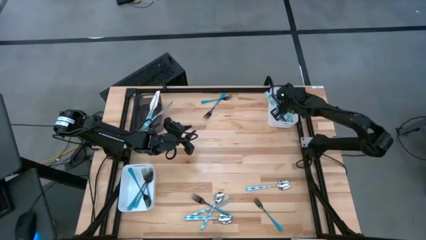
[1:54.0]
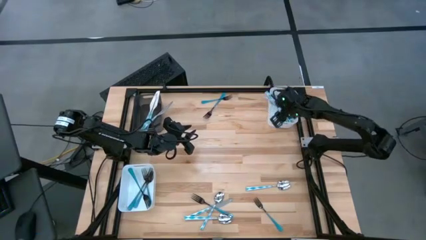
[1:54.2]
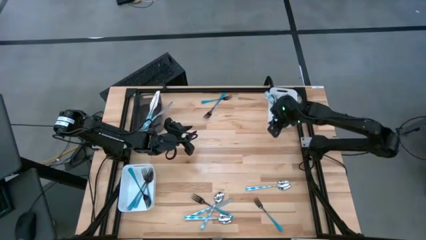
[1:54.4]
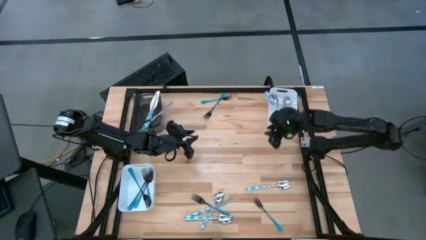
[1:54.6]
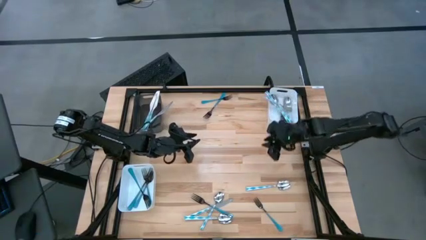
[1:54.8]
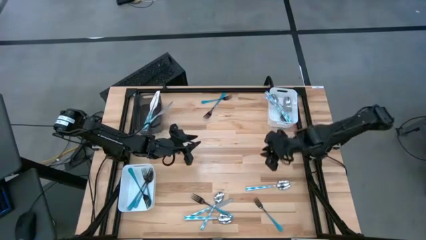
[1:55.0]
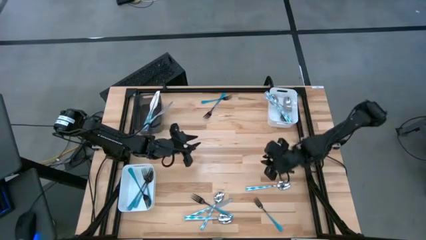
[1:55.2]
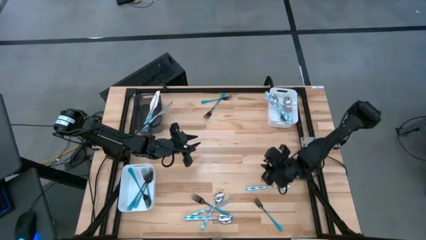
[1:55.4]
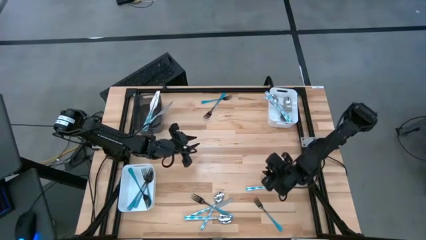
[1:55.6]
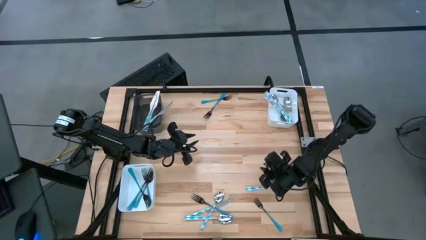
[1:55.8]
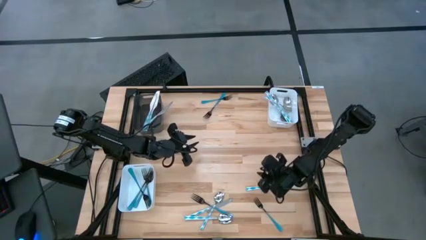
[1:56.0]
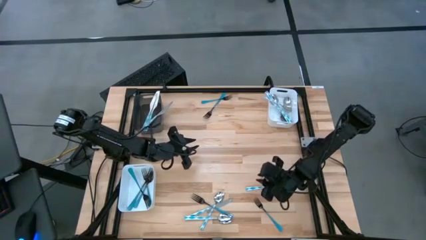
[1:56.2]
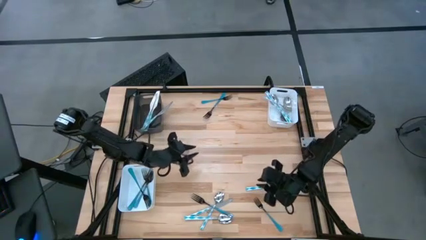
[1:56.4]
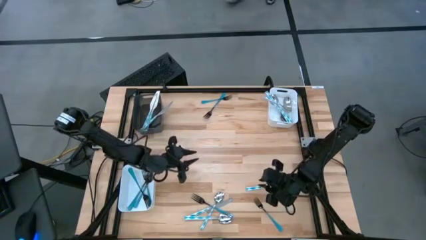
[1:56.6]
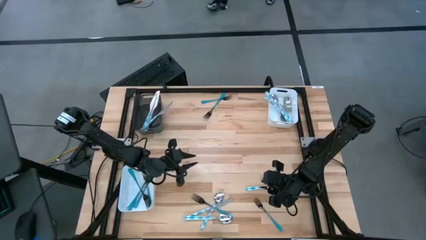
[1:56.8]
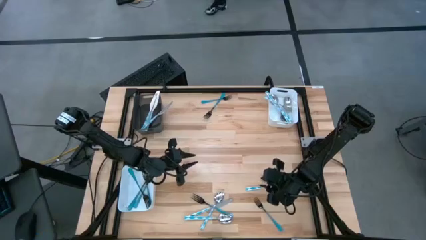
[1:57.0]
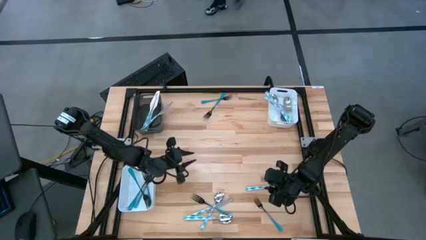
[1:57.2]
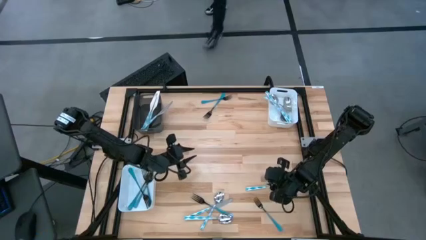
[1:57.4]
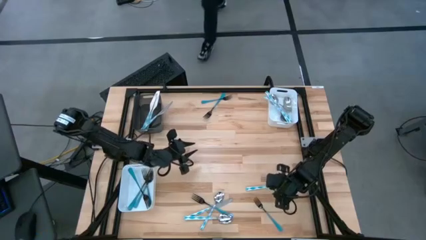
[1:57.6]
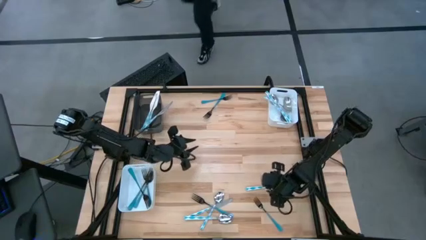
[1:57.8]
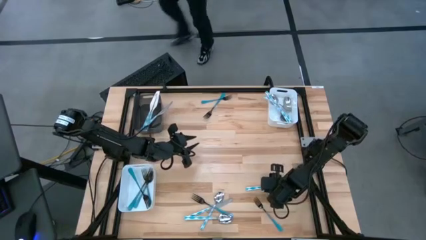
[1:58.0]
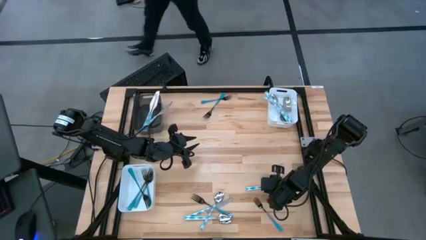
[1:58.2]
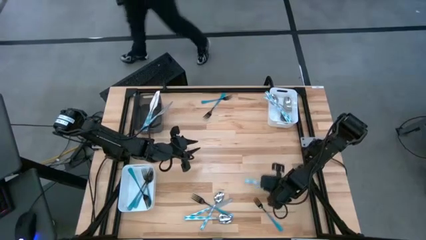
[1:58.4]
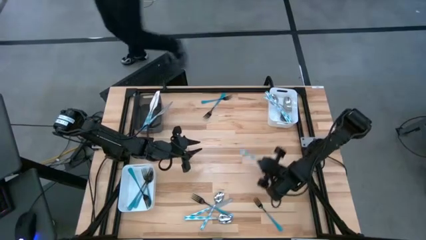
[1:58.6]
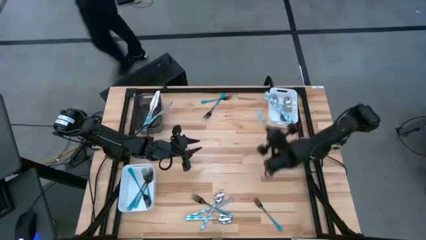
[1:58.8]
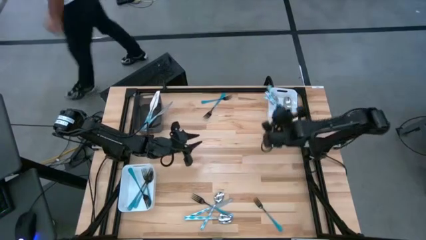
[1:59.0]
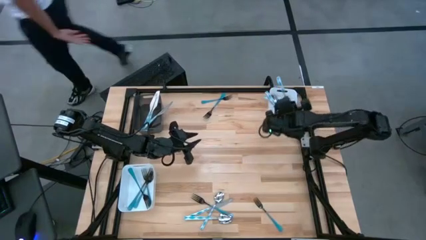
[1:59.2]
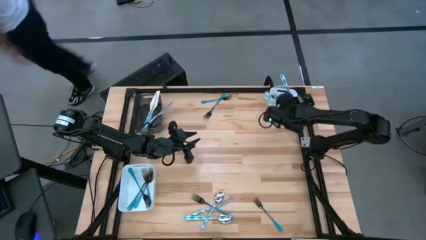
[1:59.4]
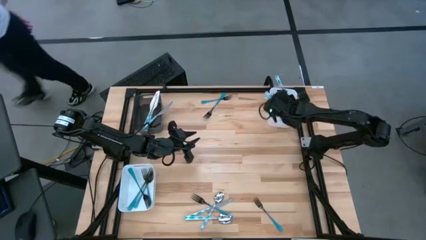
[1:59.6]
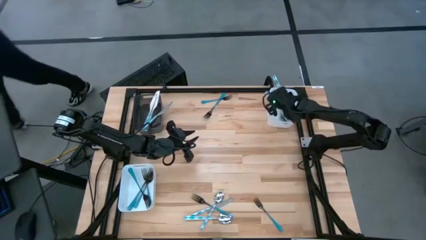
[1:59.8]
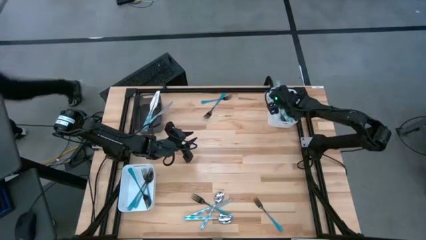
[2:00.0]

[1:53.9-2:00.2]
Task: Sort silverware by color (type)
Put the blue white spoon into the right white bin

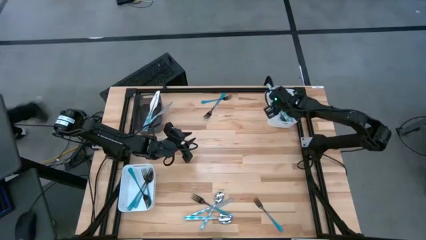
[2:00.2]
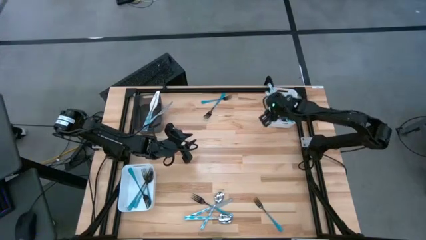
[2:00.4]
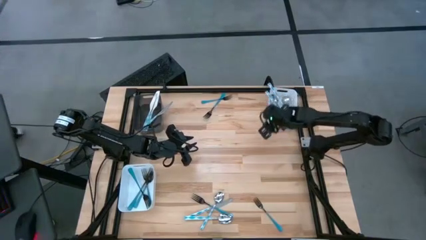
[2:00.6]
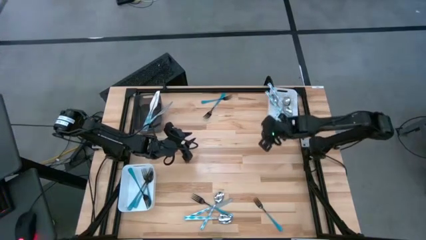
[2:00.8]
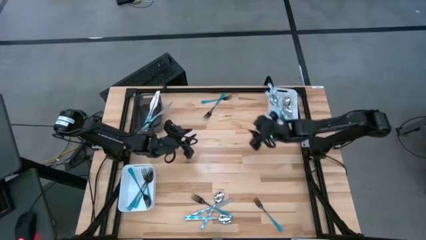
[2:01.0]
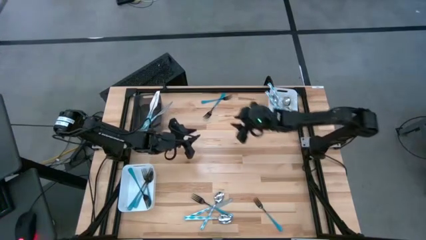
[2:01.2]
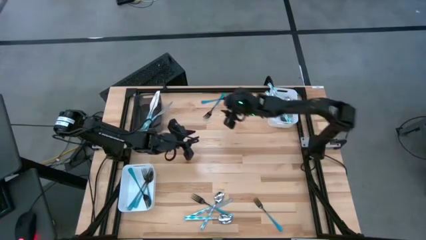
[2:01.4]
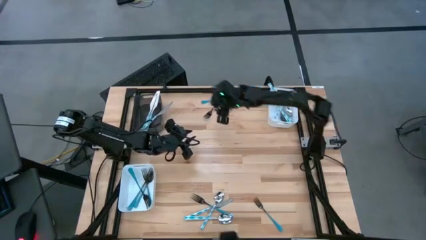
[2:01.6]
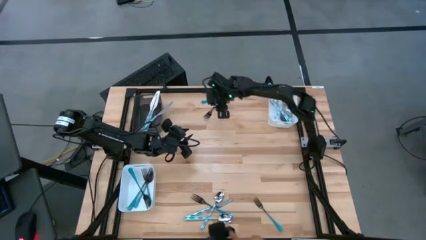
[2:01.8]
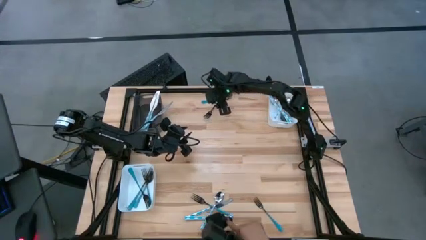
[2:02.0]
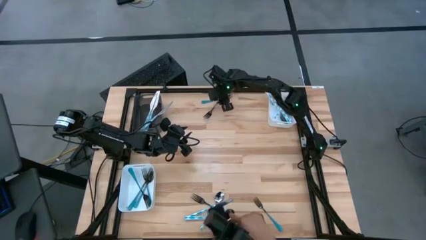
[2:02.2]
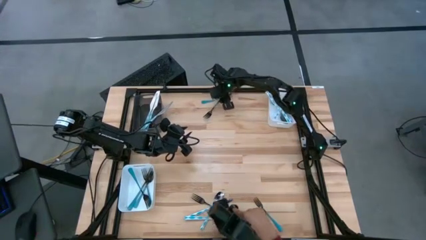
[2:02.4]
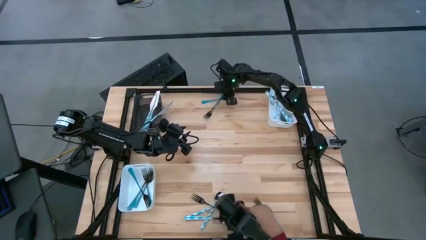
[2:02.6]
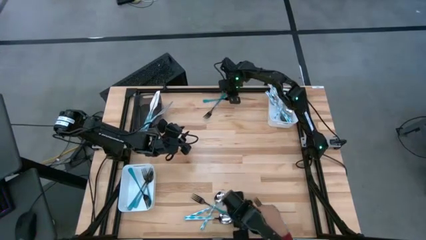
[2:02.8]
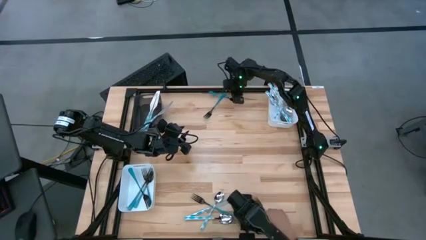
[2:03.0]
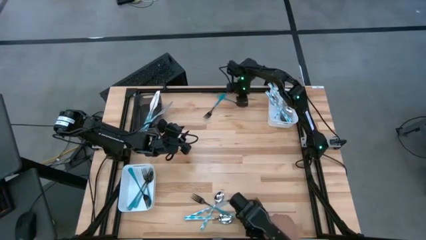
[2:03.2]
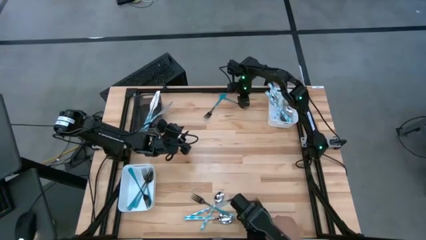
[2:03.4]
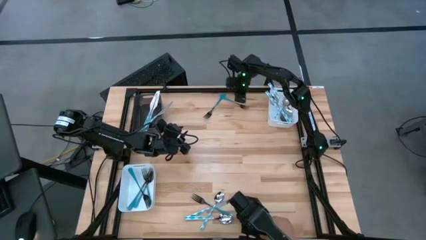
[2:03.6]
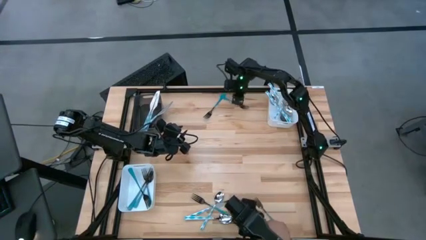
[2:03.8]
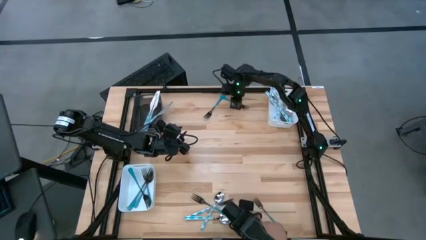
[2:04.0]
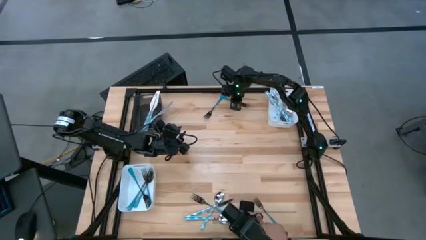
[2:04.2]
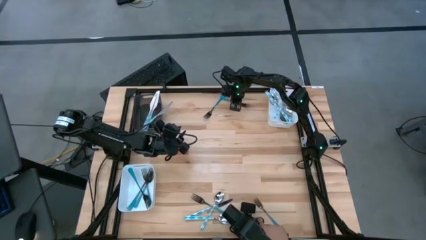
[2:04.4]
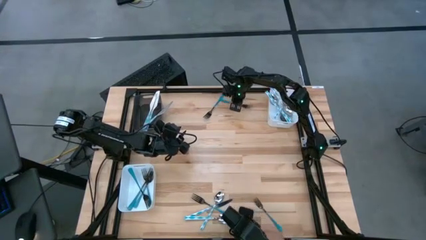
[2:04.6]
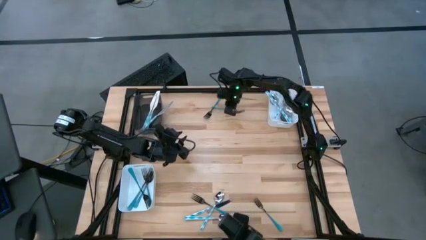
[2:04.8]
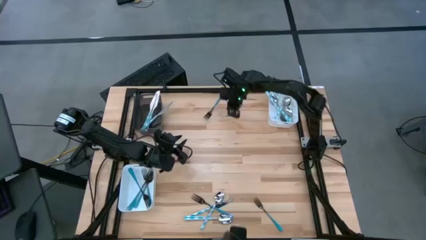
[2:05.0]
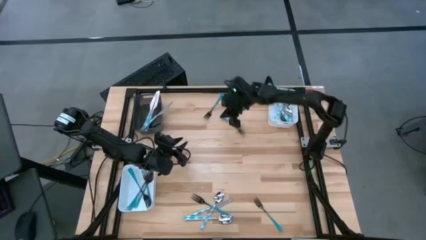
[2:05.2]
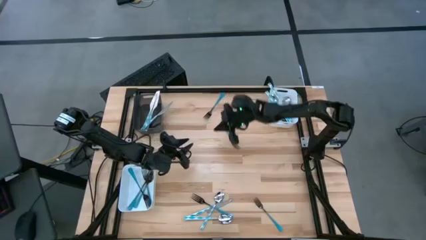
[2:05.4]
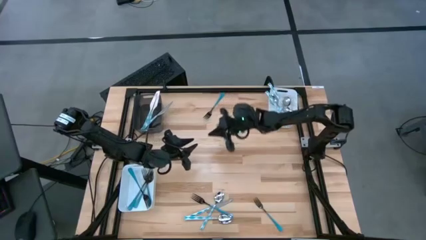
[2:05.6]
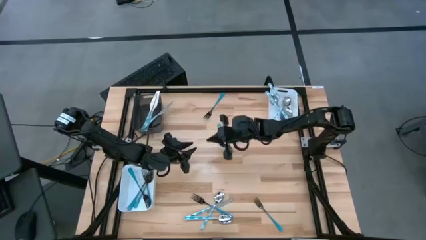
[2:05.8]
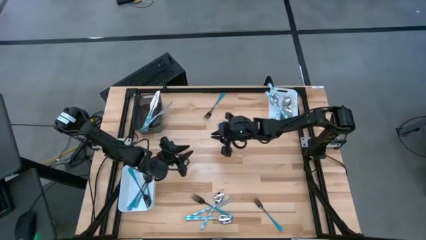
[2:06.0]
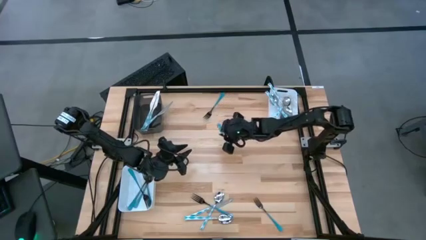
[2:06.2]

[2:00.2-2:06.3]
Put the blue fork into the left white bin

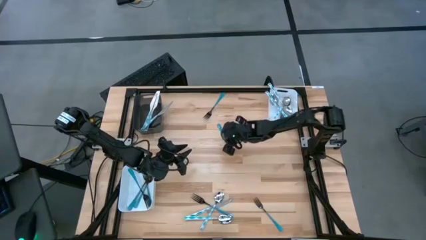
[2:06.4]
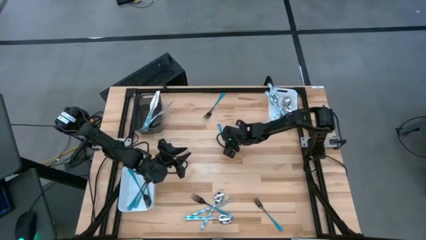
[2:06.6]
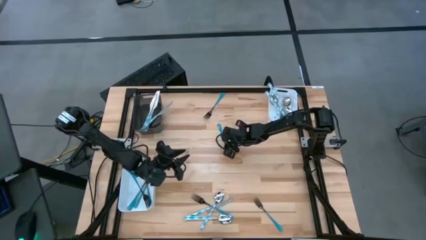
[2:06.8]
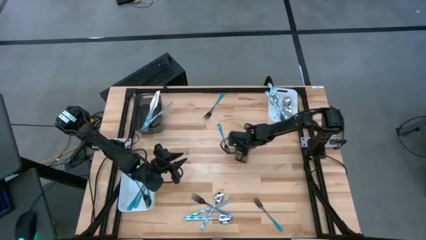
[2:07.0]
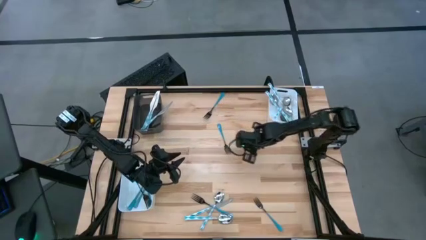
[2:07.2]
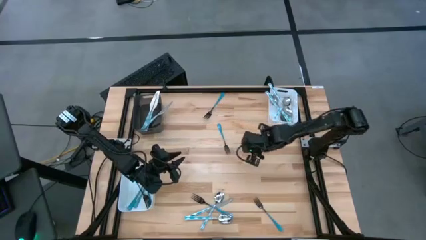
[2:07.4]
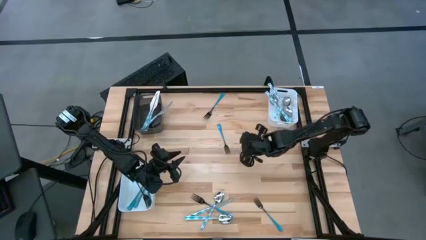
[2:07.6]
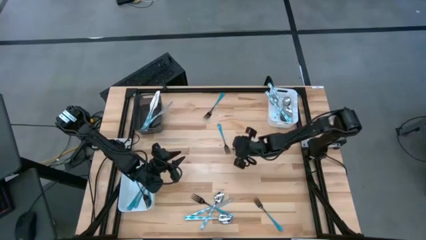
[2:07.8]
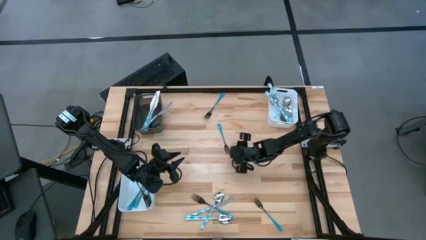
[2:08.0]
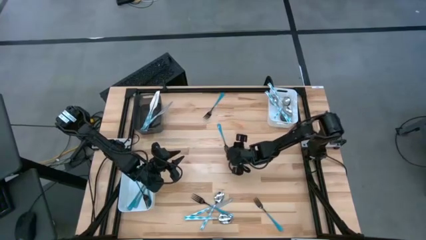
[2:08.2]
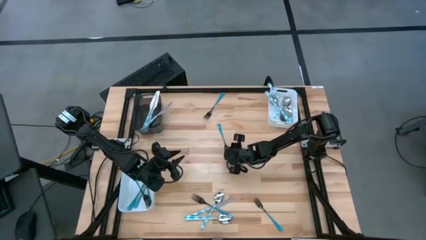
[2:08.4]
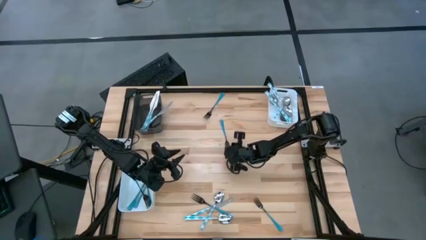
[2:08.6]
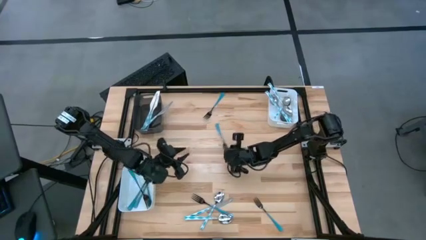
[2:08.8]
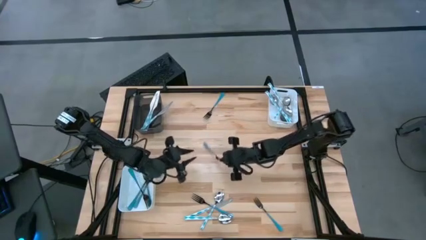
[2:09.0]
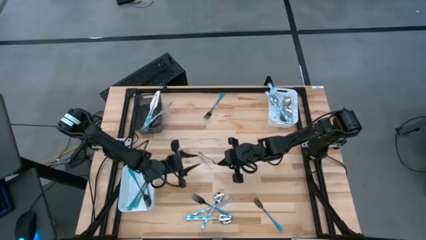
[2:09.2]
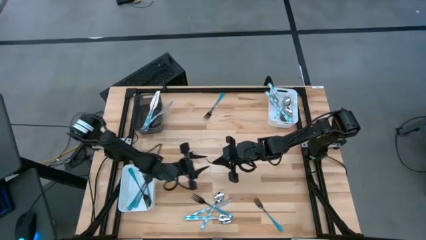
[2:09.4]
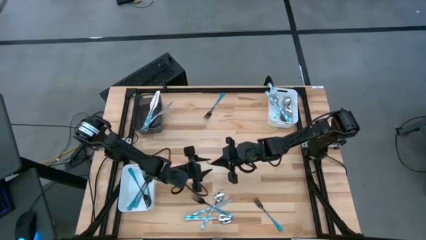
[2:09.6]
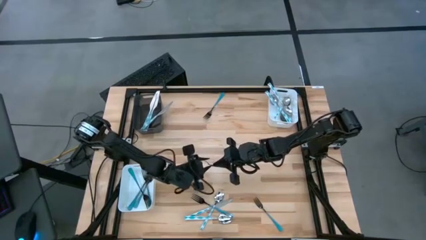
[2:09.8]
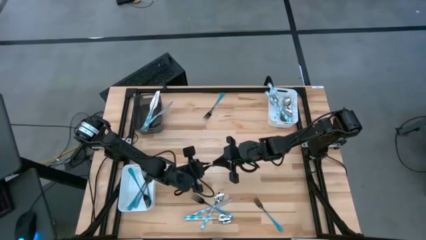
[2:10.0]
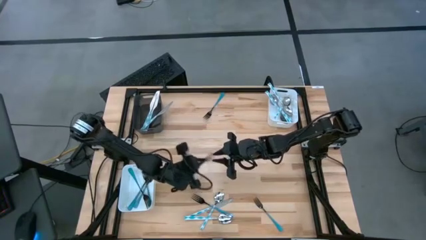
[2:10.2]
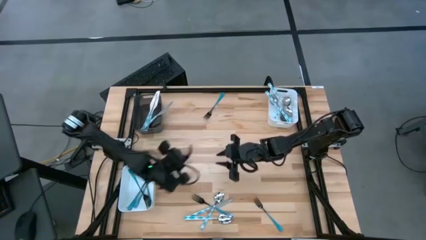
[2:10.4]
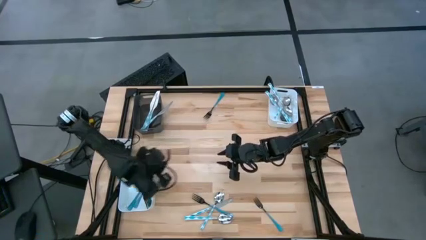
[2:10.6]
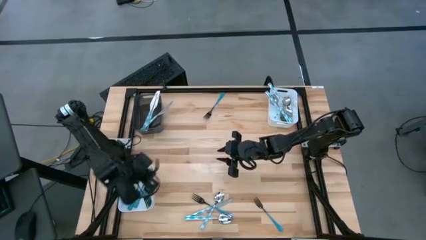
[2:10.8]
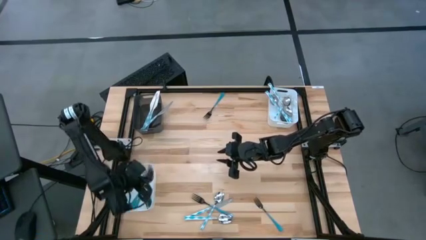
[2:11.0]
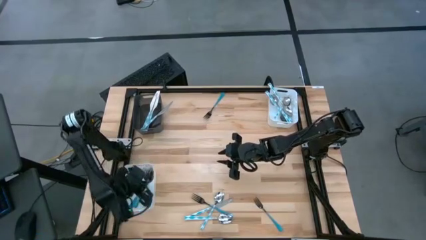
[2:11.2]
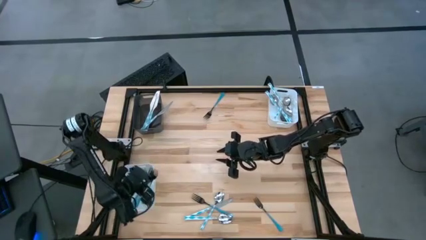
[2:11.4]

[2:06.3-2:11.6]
Put the blue fork into the left white bin
